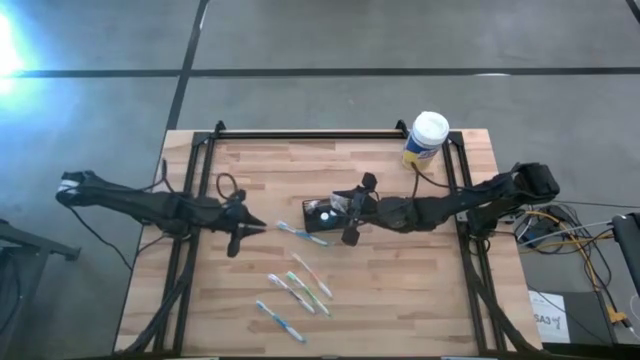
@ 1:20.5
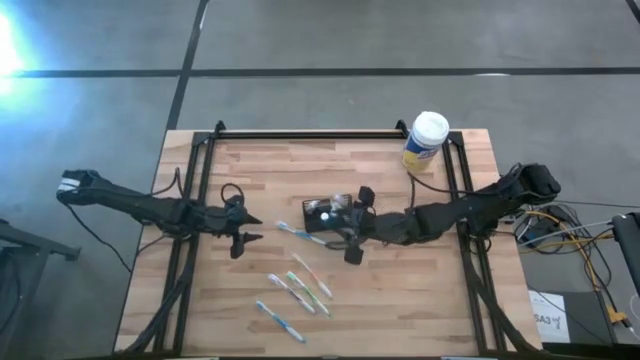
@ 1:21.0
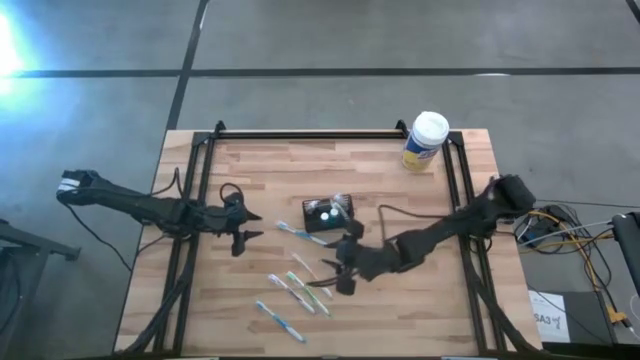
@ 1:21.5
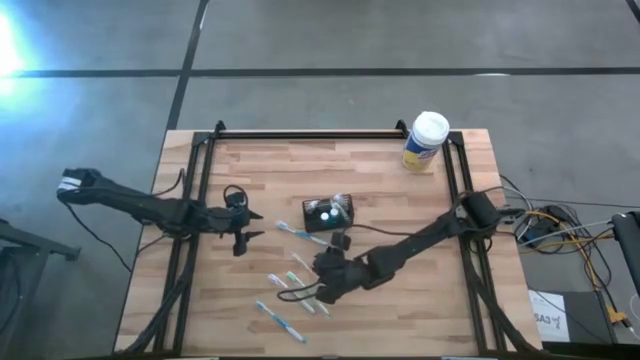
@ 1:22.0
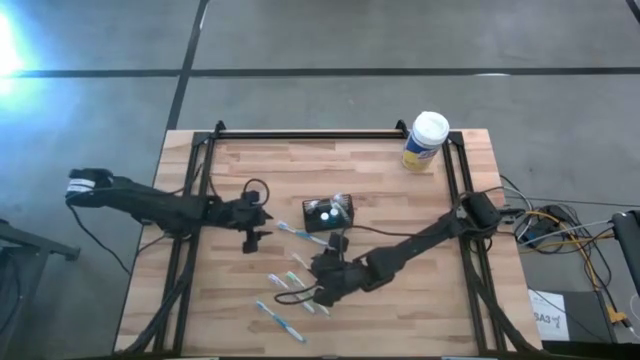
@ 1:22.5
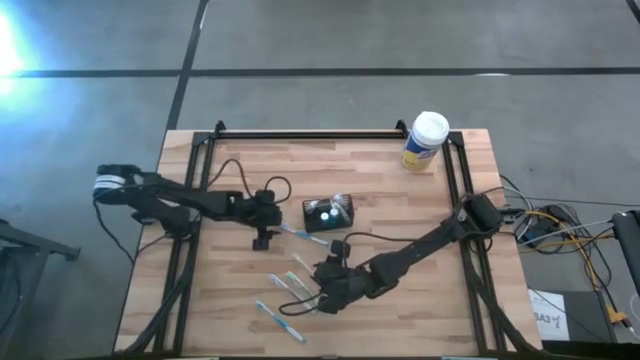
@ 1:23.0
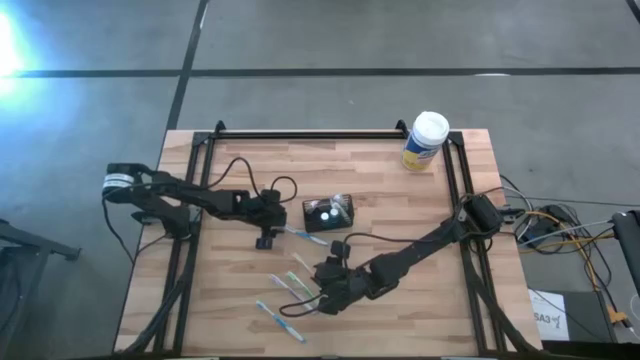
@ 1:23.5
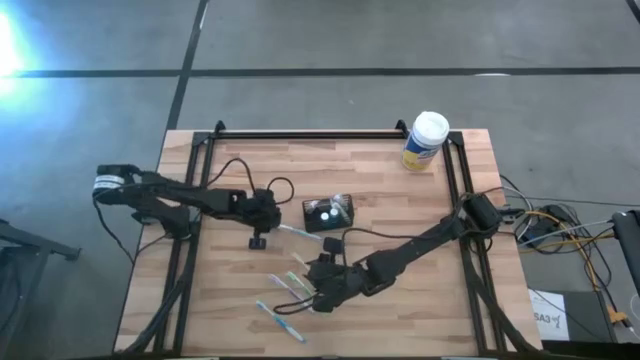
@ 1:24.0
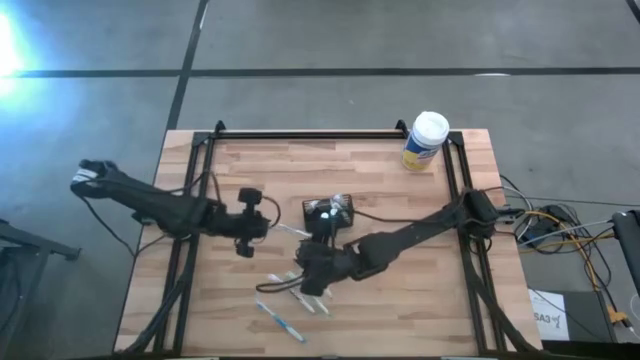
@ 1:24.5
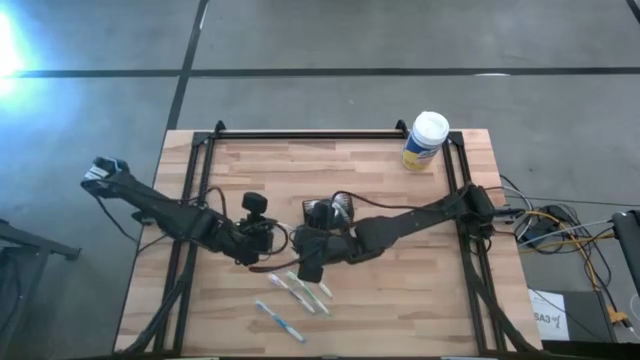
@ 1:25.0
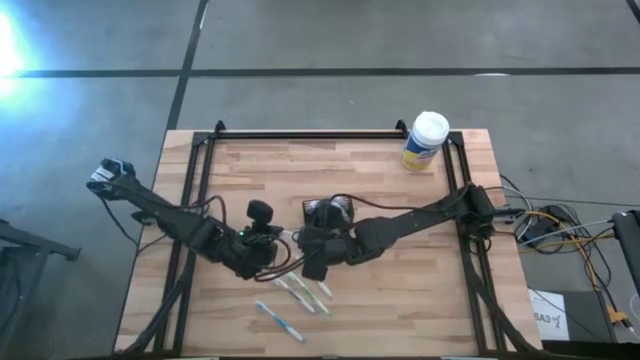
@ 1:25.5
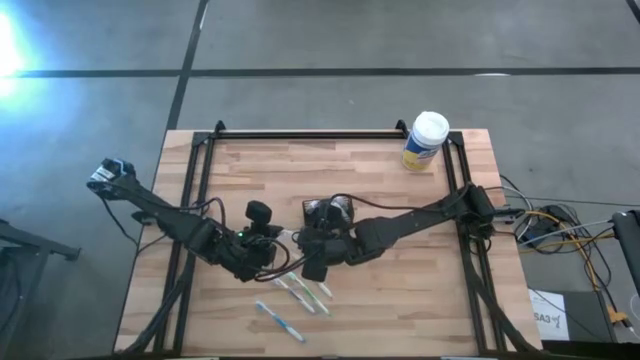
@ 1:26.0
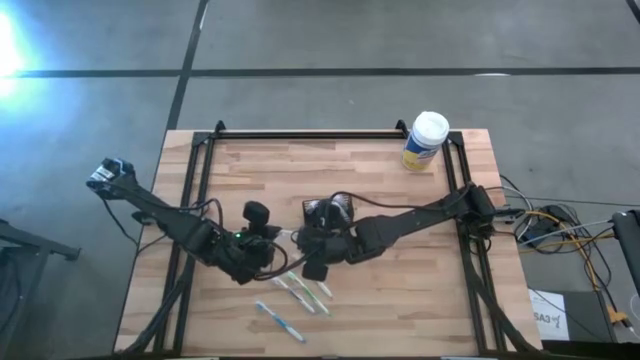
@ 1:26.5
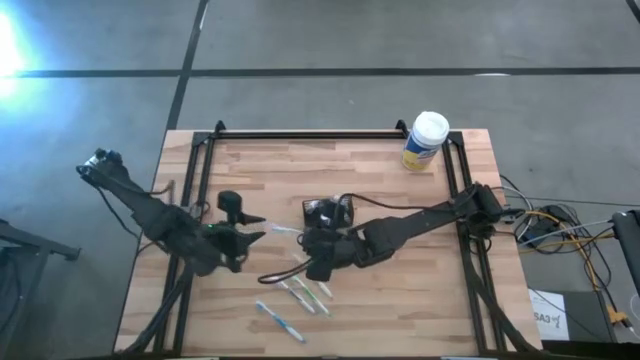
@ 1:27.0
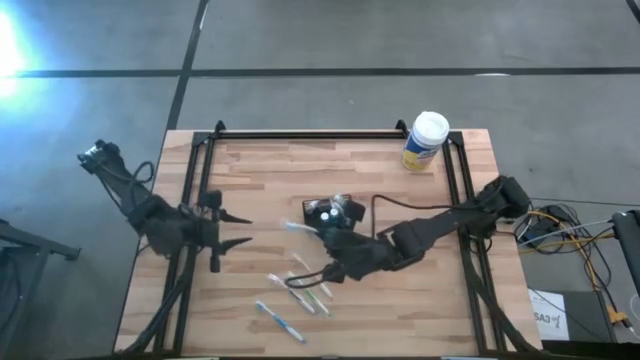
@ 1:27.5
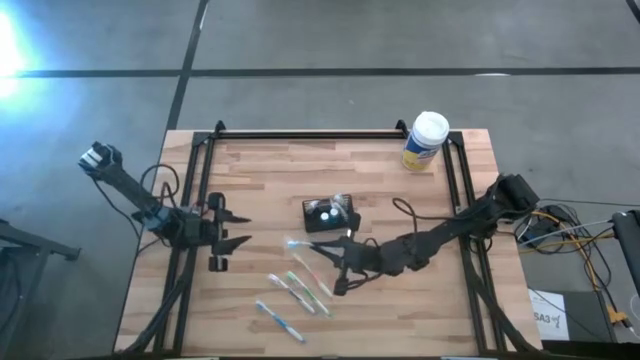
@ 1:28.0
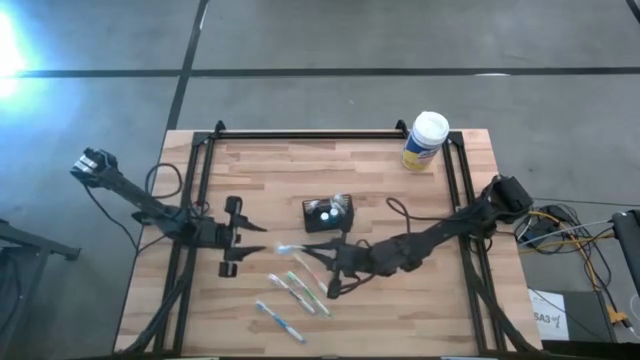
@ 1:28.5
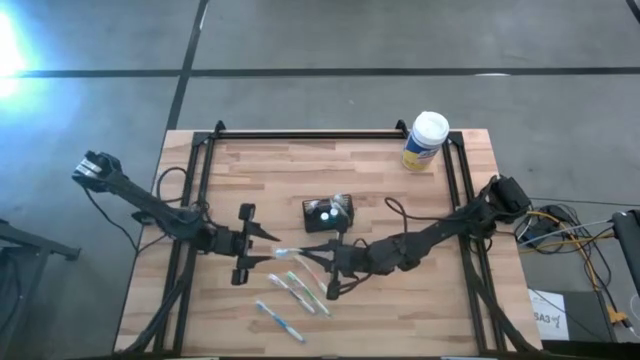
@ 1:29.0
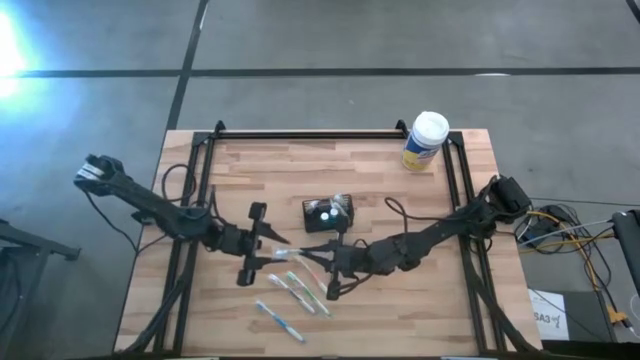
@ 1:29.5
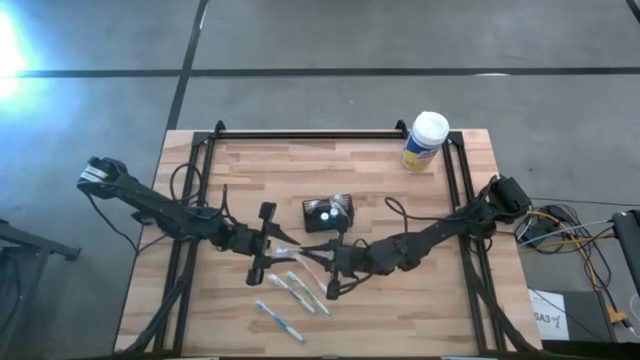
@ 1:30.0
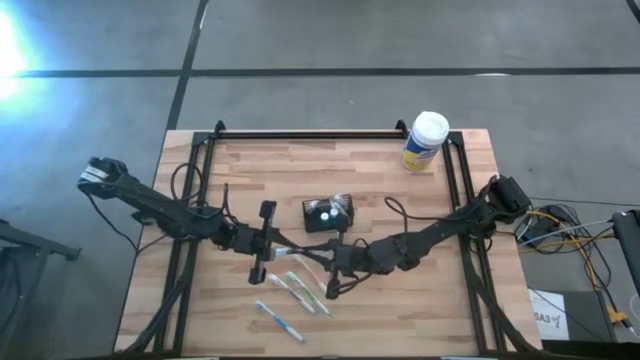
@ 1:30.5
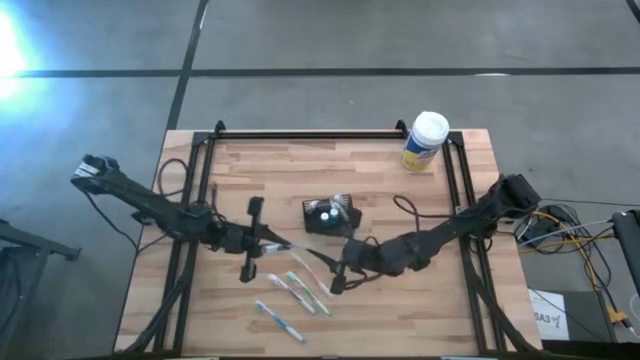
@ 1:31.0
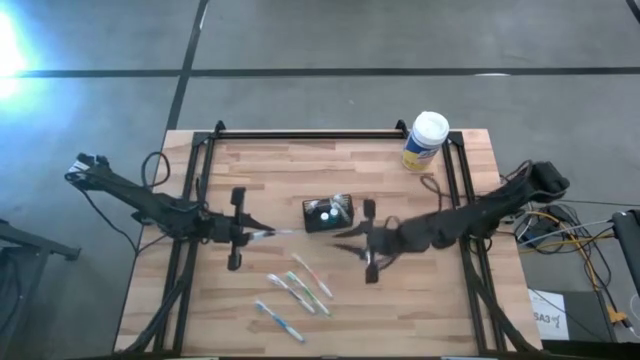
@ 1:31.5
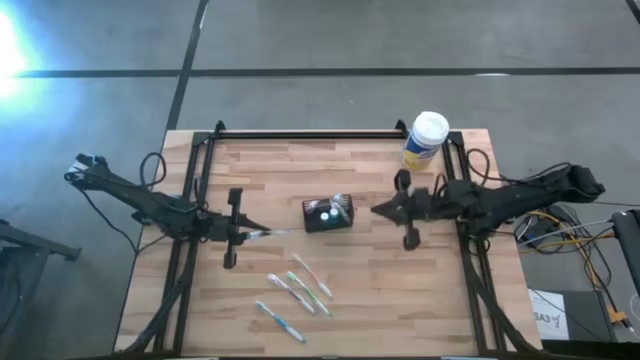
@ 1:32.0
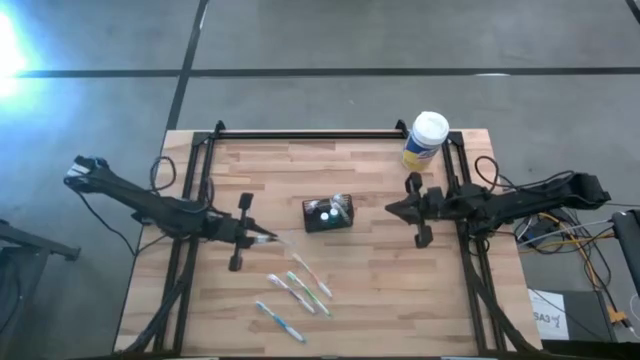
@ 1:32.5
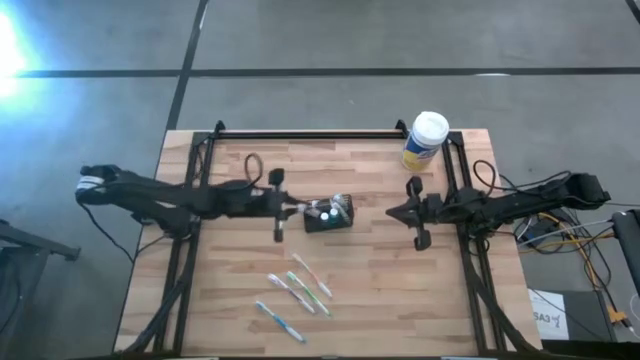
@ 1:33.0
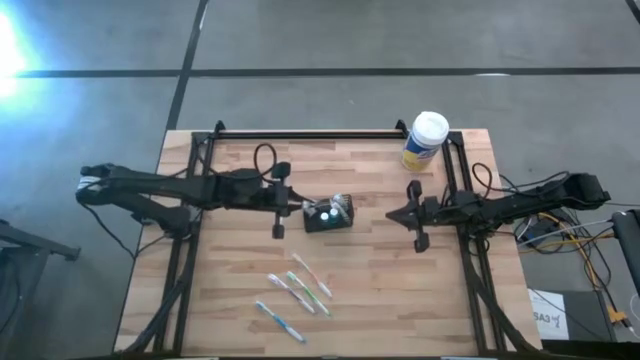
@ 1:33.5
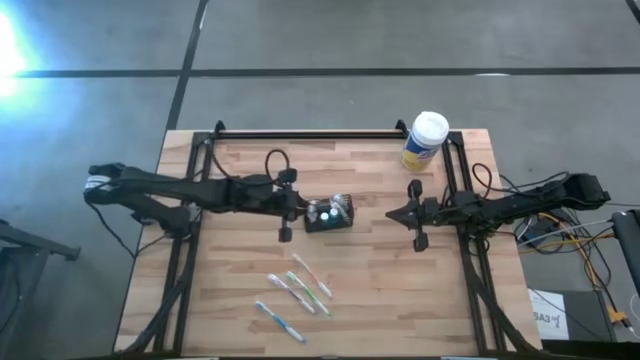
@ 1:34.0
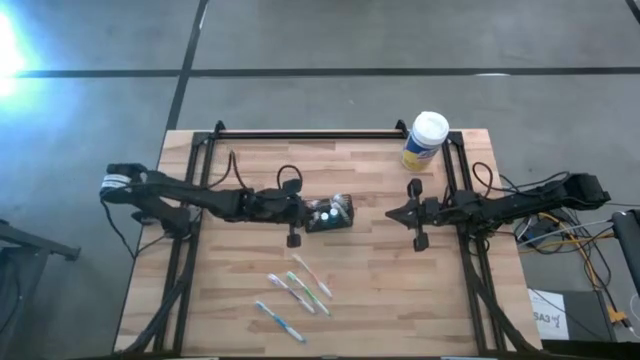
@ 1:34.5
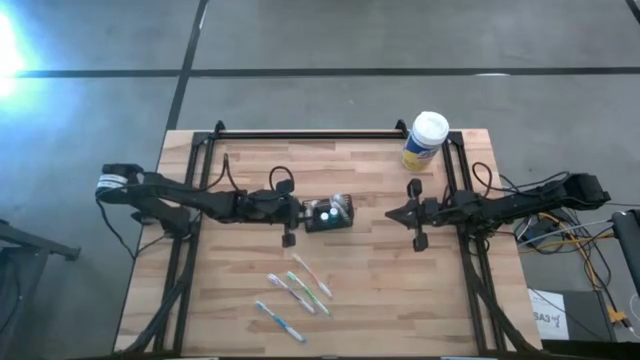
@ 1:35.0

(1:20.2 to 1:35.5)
Task: Pick & Place toothbrushing station
Put the top blue toothbrush into the black wire organizer

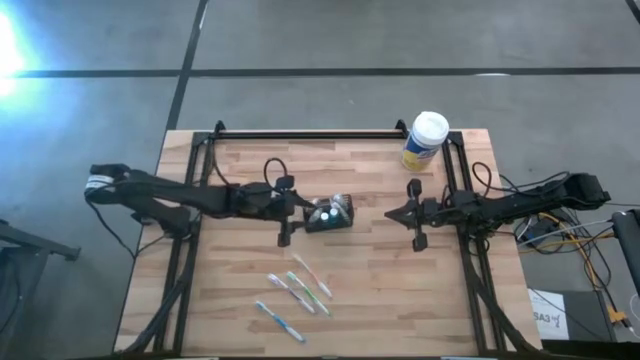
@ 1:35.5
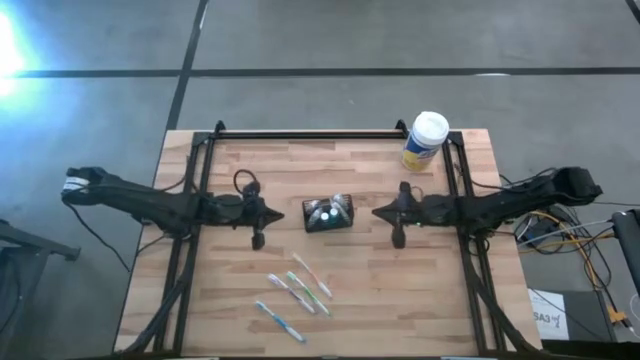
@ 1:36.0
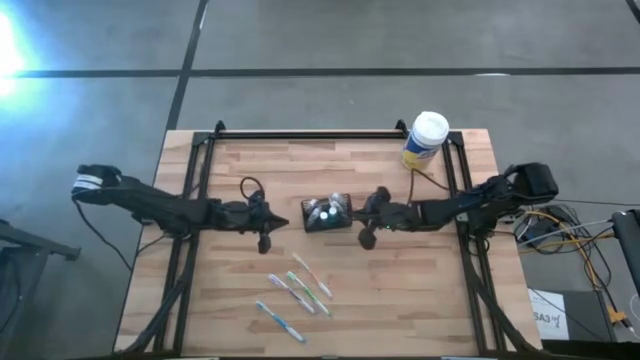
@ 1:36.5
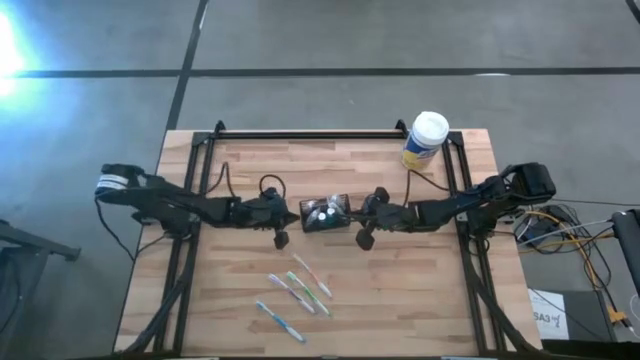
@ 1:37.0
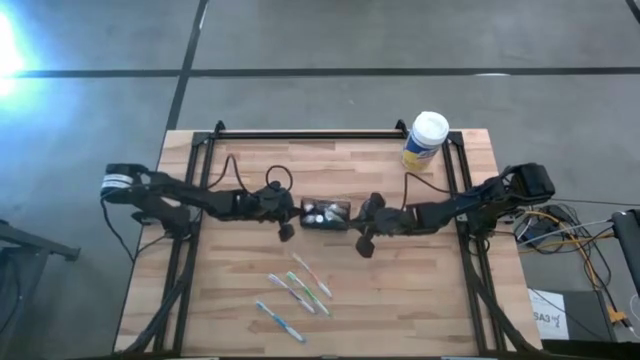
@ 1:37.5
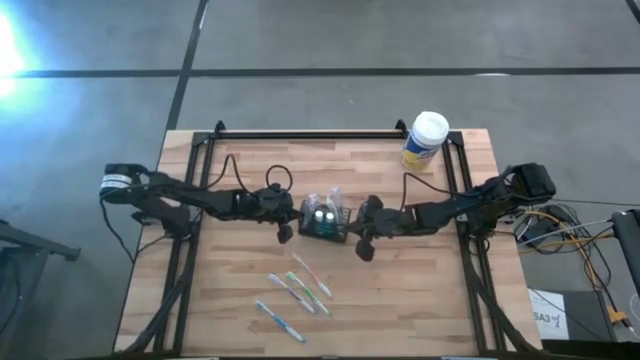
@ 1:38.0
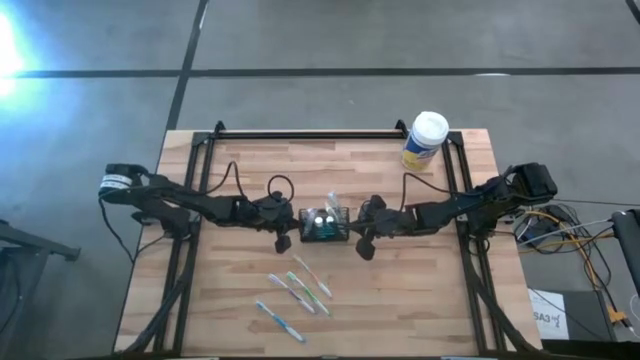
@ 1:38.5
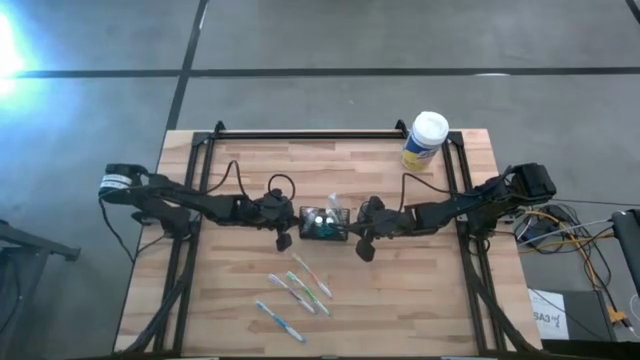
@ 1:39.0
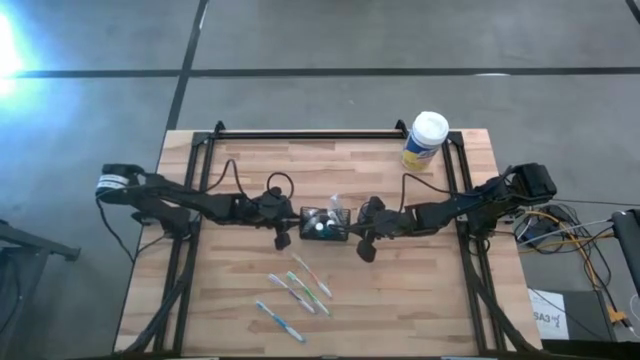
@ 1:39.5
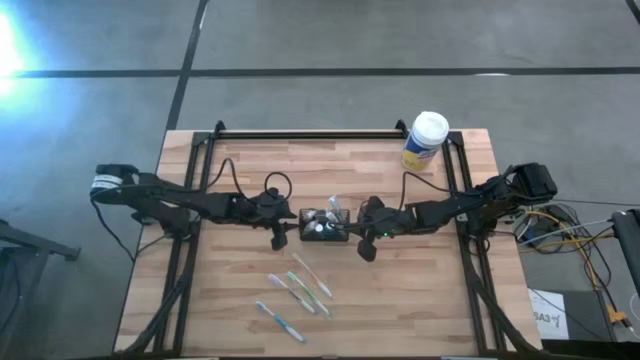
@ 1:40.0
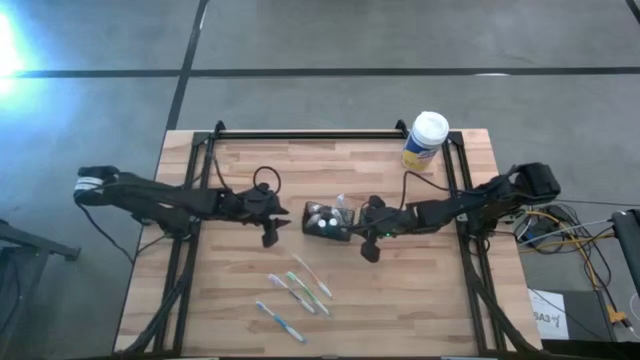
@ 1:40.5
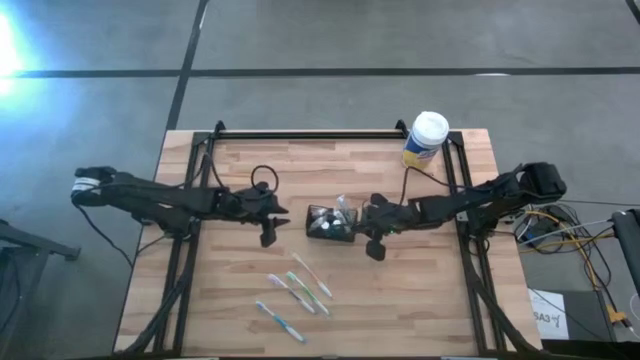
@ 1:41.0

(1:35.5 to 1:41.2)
Adjust the black wire organizer
